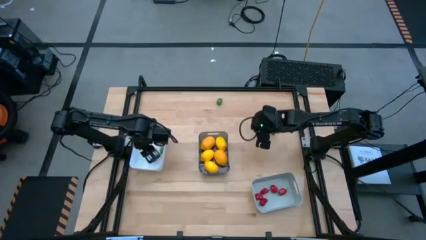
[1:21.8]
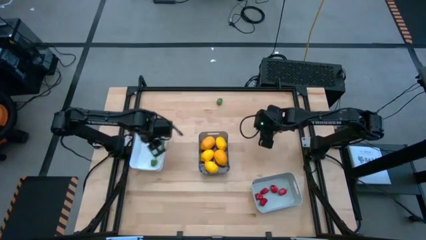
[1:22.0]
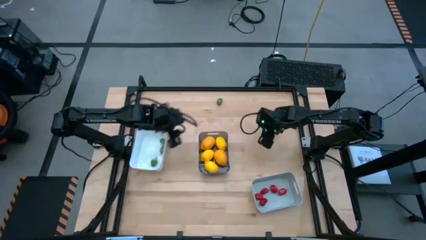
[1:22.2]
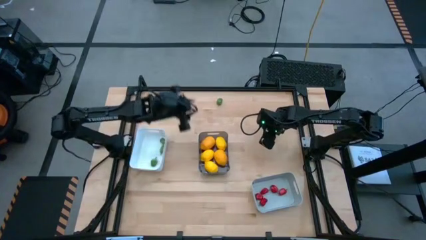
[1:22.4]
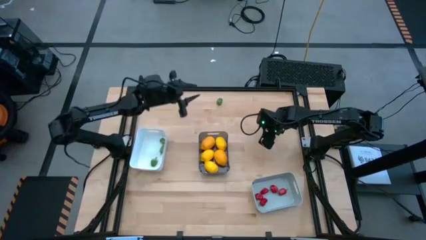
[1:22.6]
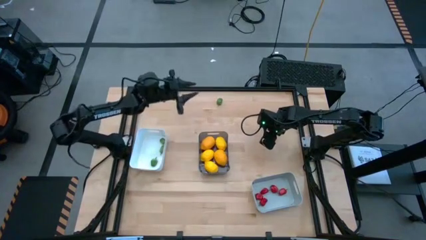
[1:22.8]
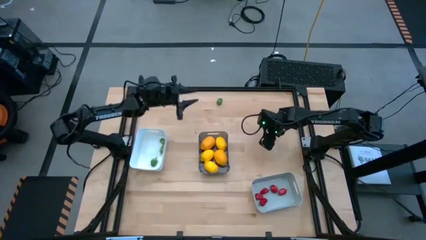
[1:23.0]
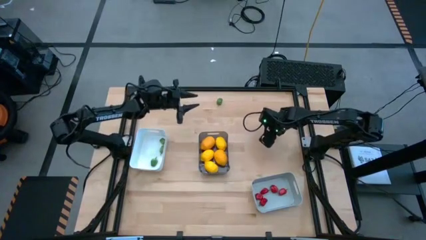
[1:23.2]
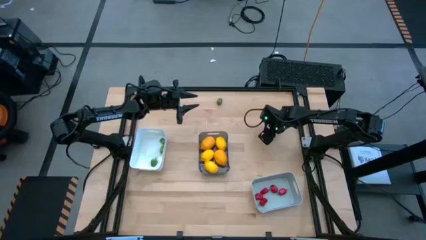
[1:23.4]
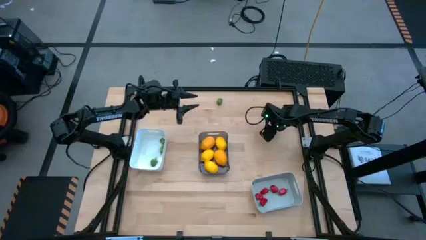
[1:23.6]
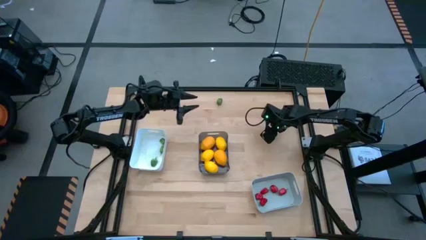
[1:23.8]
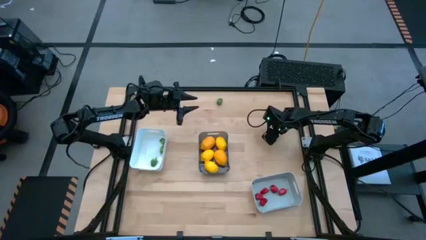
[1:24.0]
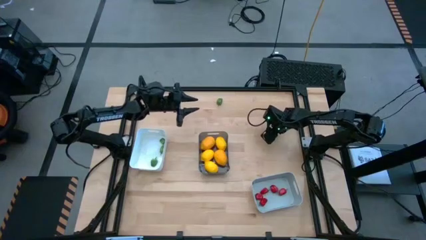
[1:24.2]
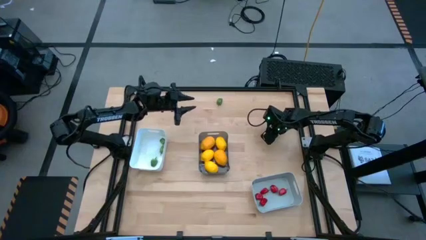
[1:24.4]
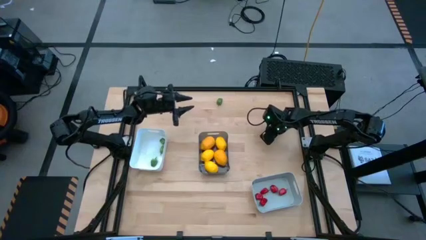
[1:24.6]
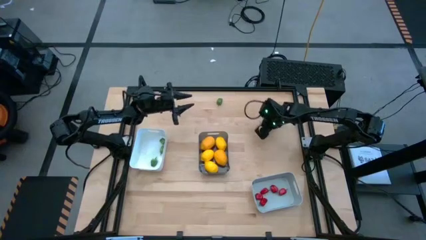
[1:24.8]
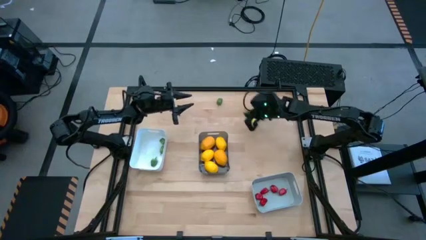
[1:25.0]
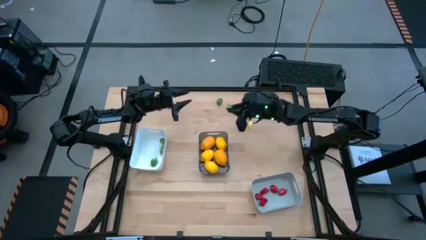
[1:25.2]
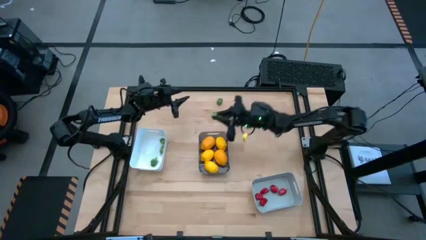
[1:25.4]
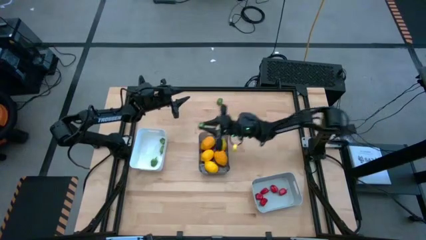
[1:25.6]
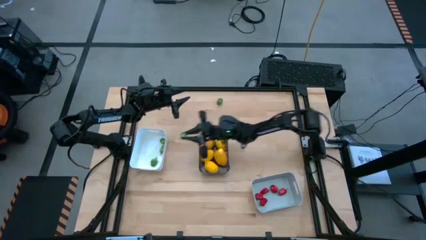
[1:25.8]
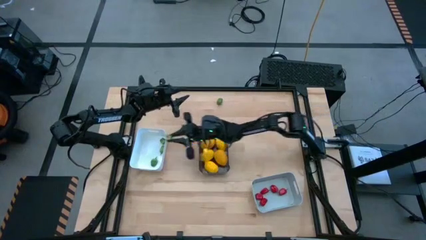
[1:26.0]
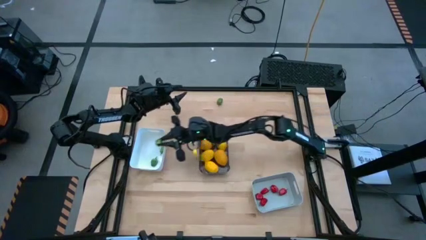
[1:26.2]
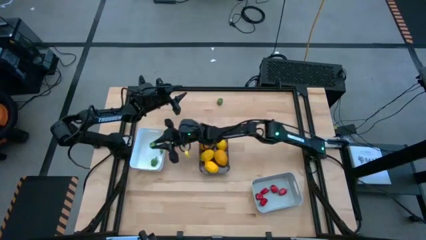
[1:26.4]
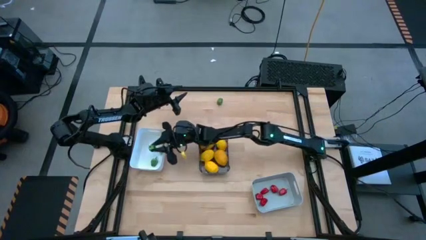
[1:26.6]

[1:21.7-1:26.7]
Task: Sort produce into baskets
Put the green chili pepper into the white bin

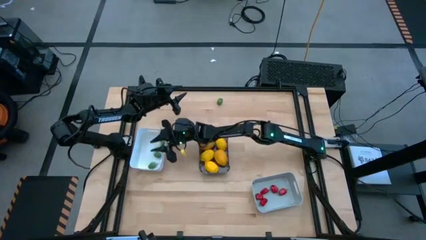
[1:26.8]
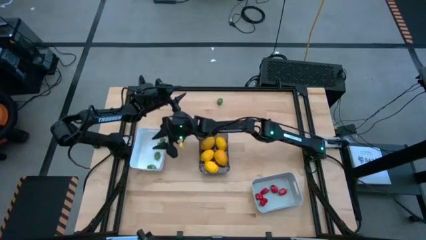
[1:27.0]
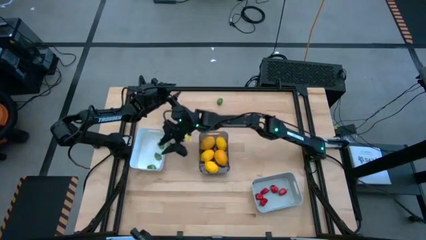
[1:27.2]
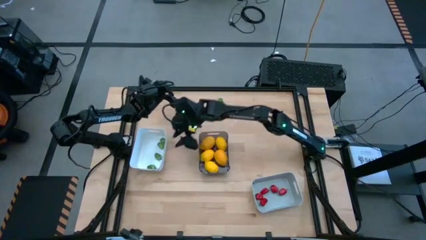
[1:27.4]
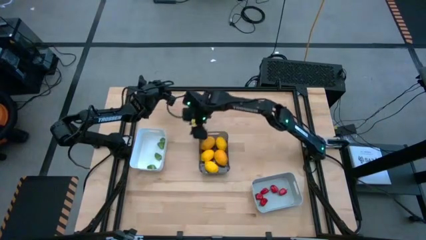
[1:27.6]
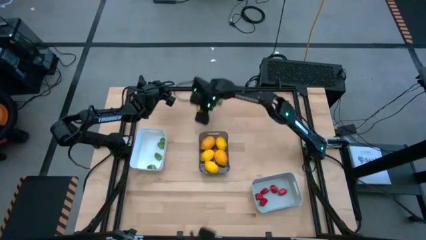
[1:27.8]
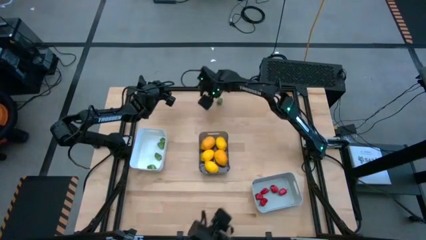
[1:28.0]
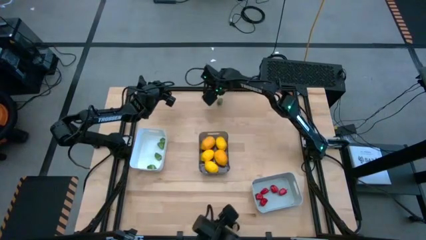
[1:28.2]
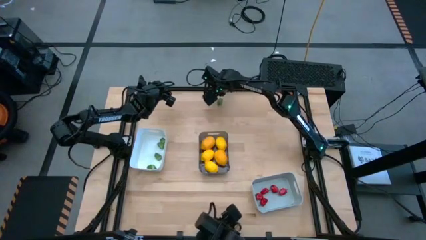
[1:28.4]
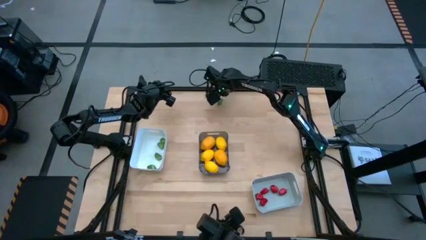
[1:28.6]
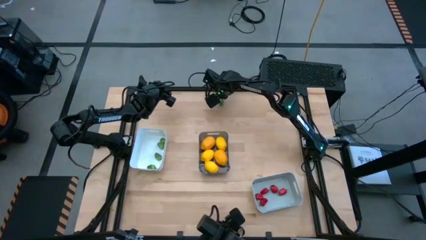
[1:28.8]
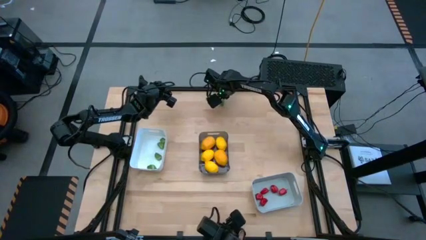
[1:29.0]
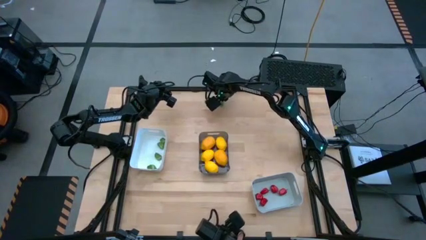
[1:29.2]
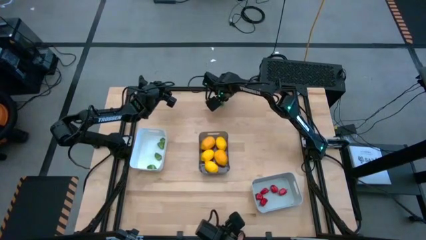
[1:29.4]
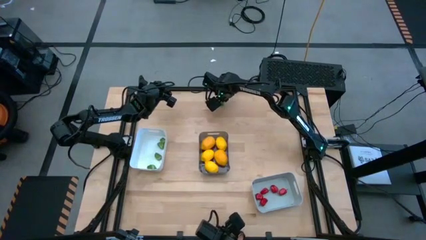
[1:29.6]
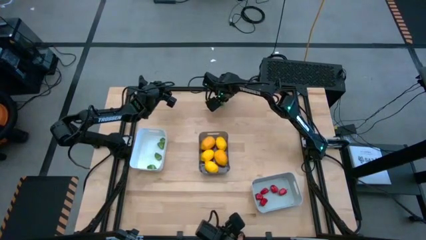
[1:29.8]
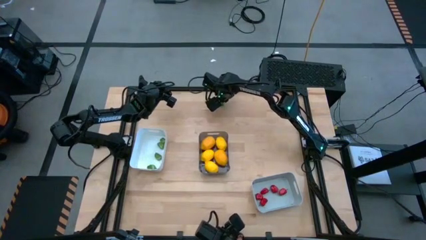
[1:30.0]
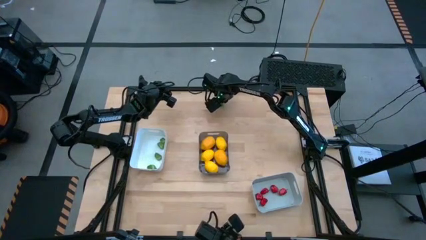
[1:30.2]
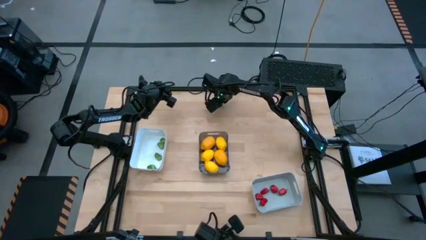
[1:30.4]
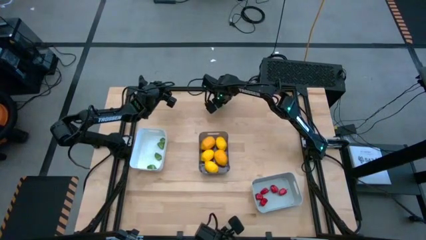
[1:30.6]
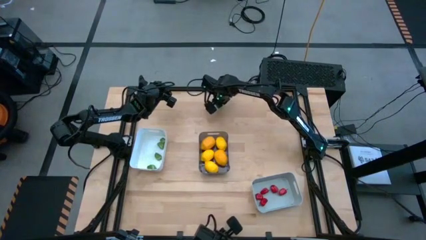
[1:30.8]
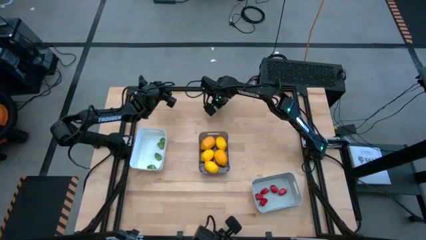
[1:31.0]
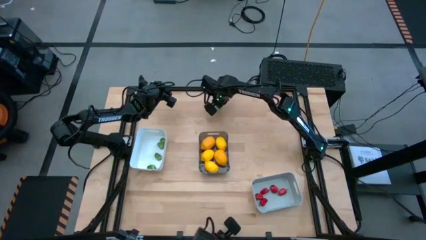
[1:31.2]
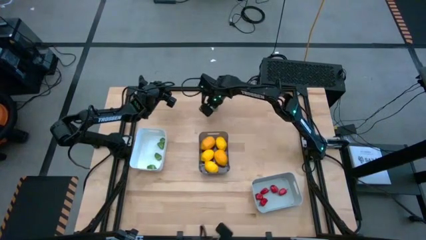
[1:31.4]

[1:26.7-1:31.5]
Put the green chili pepper into the white bin

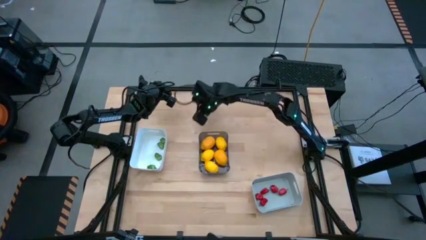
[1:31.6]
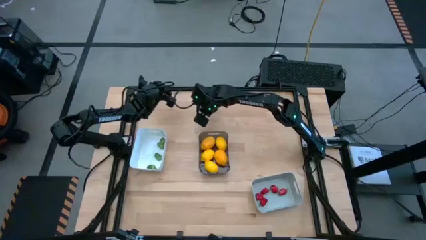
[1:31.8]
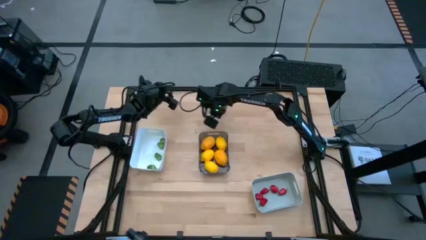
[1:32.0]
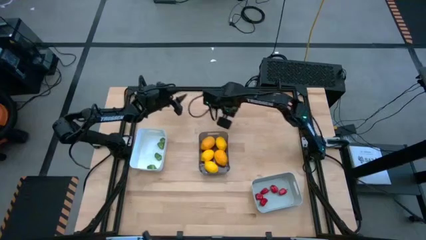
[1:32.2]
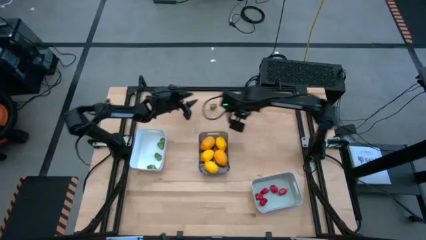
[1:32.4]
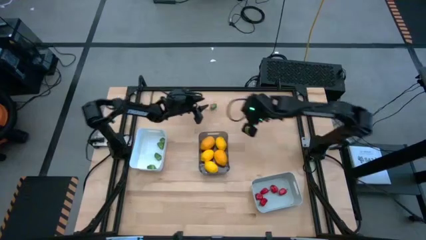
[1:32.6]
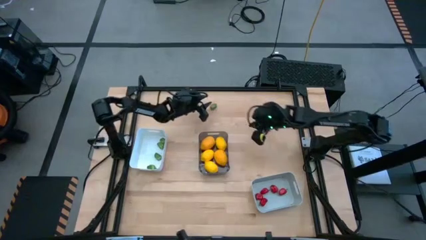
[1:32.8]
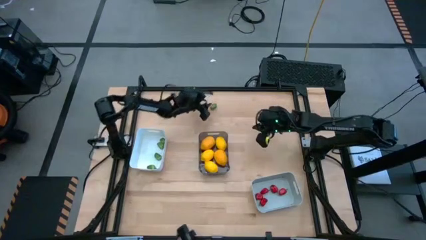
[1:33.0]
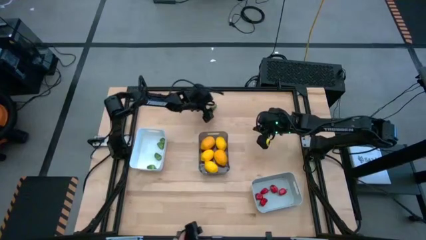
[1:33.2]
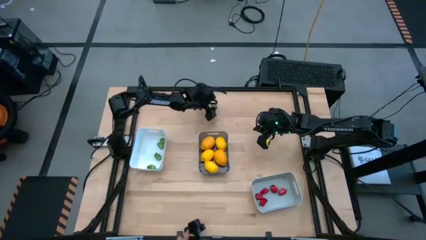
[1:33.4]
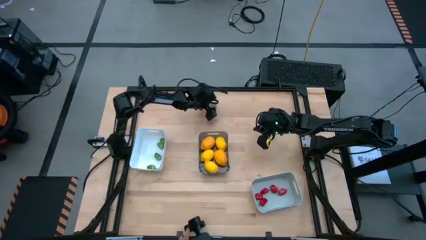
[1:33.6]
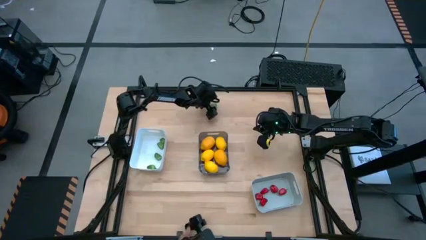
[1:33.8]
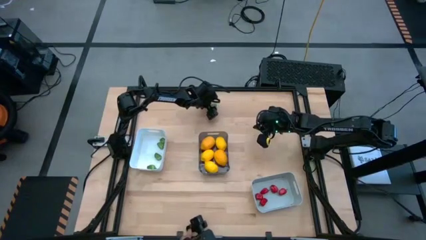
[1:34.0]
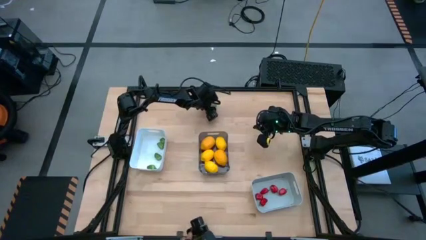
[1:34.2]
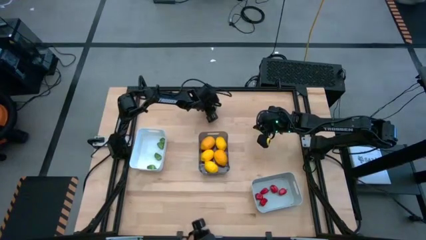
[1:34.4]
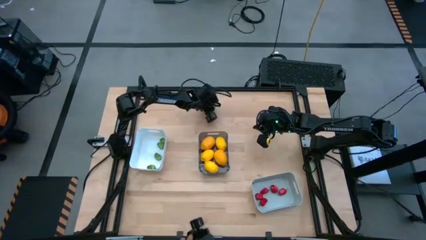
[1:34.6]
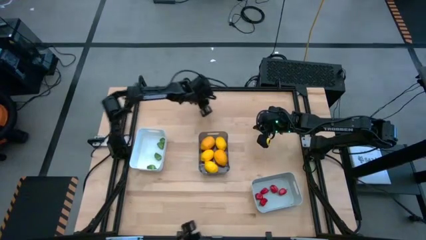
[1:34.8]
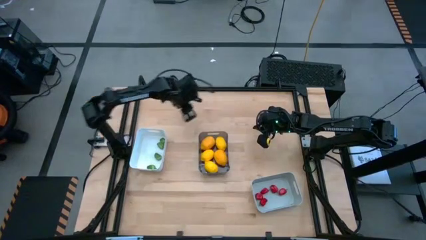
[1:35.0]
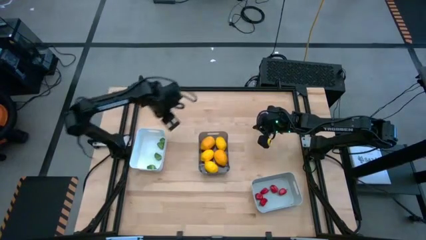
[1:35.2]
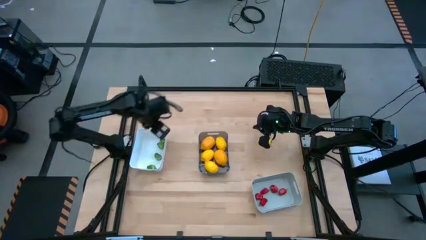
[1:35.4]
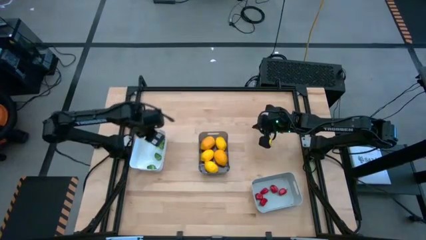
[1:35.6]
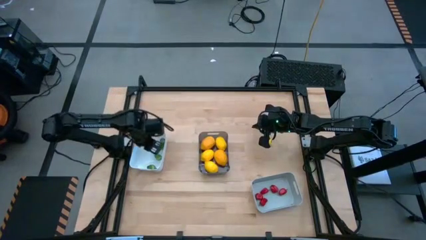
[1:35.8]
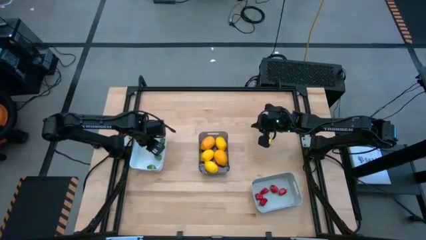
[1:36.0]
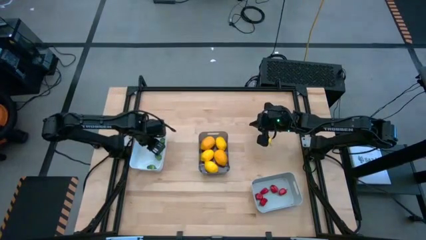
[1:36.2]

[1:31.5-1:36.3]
Put the green chili pepper into the white bin

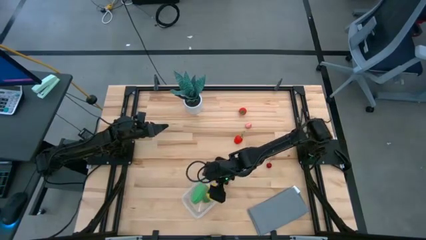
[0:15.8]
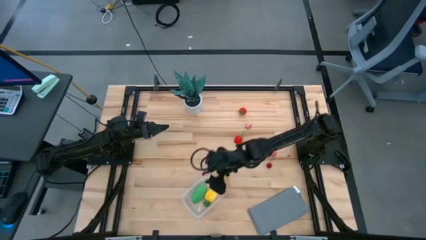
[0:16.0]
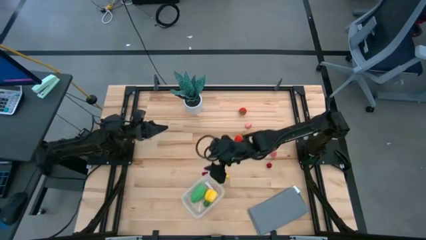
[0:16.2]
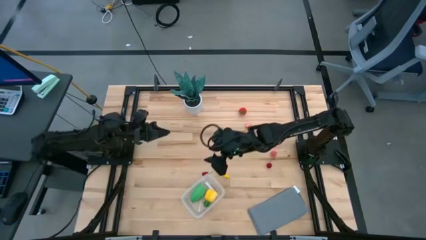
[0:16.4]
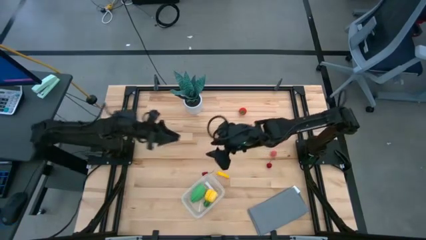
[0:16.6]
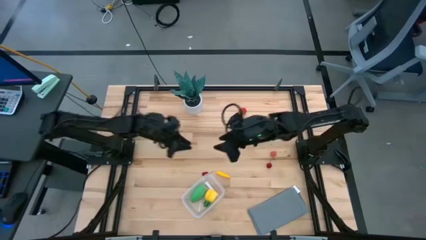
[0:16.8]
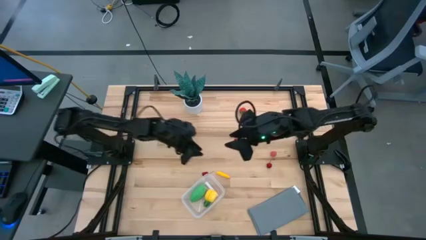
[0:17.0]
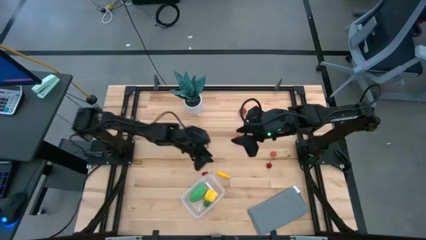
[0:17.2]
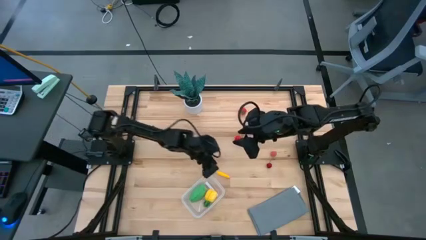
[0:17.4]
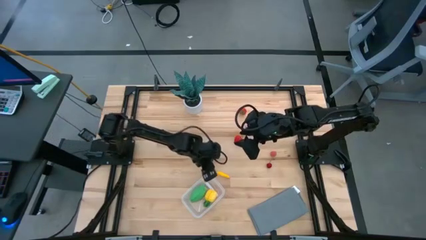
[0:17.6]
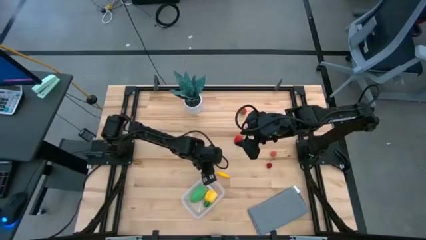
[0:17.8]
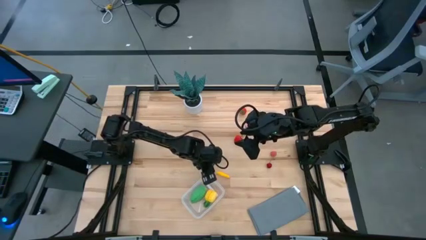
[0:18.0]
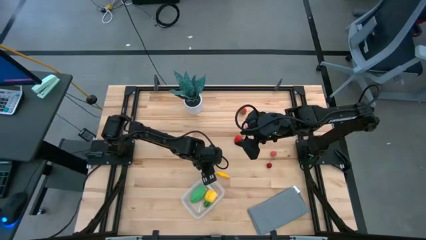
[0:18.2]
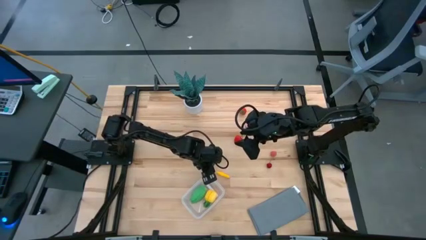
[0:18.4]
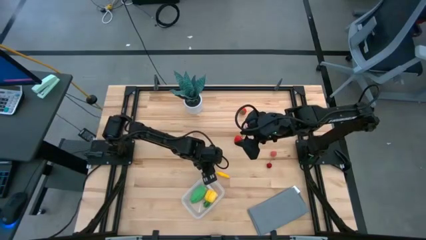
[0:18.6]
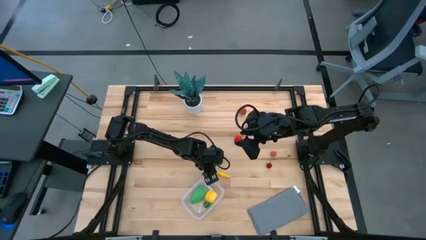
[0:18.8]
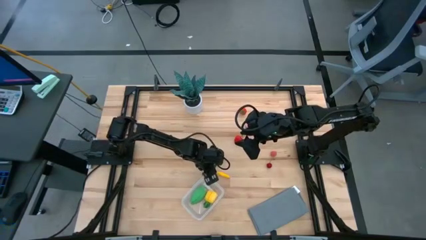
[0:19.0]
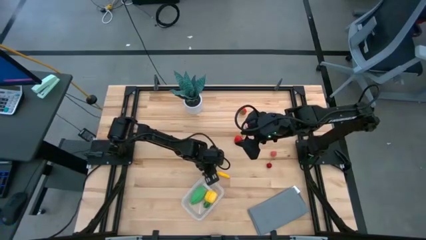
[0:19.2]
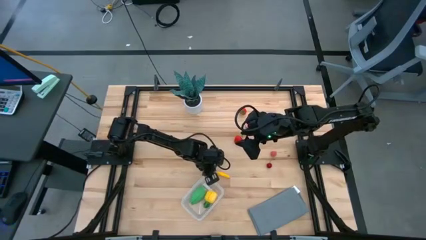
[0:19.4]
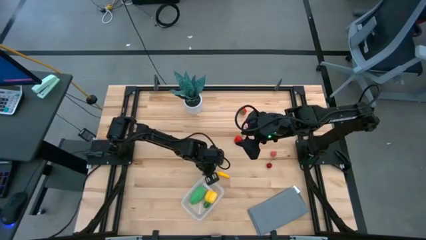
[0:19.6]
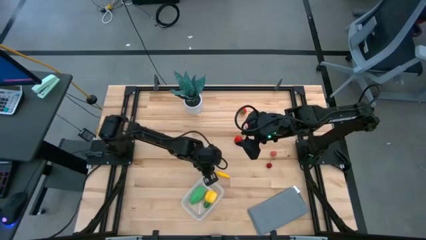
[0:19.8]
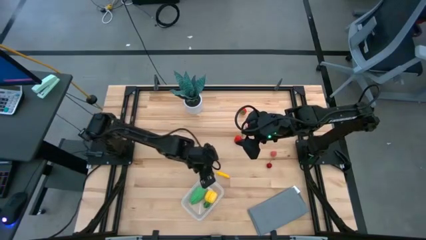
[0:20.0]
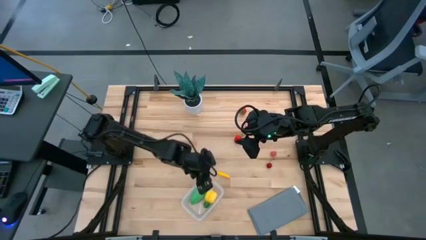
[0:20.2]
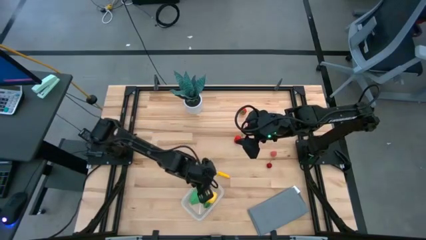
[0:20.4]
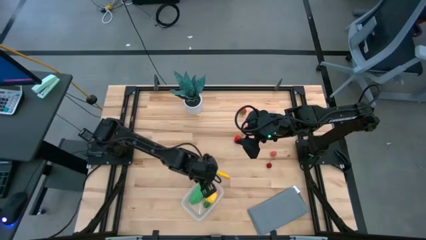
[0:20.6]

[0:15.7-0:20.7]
Task: Pick and placing Produce into tupperware
Put the left red cherry into the transparent bin
